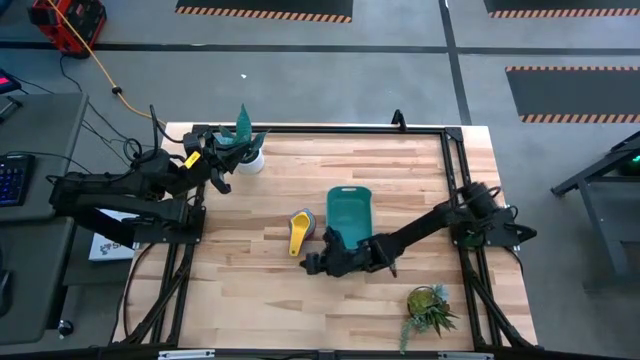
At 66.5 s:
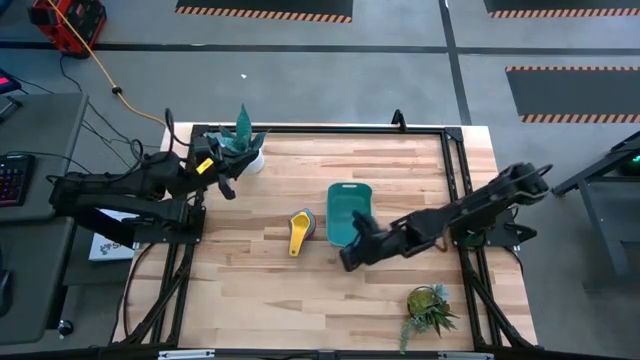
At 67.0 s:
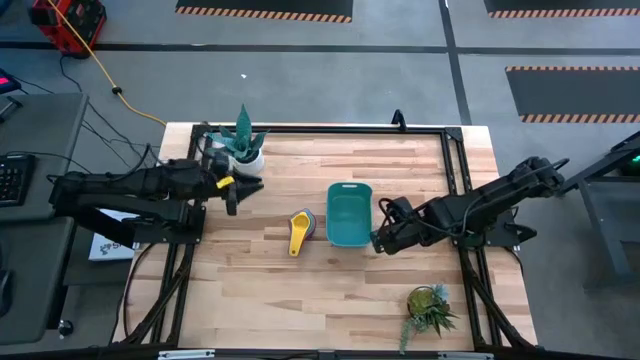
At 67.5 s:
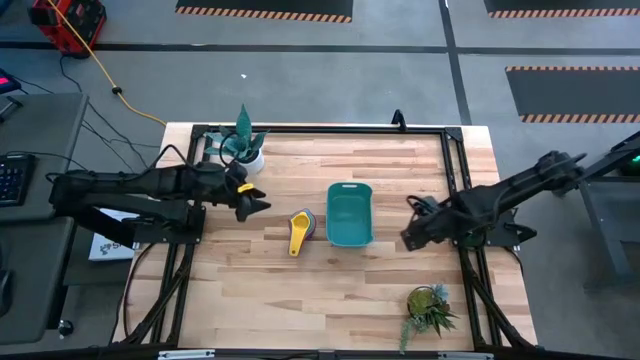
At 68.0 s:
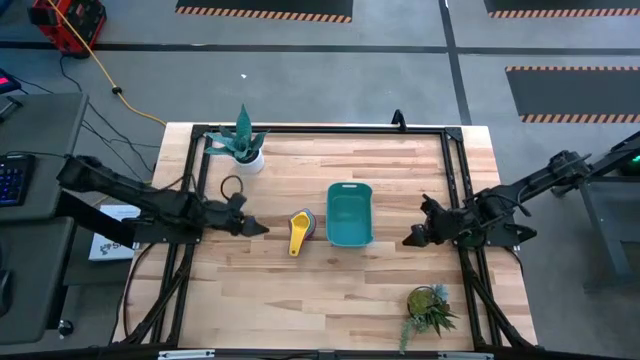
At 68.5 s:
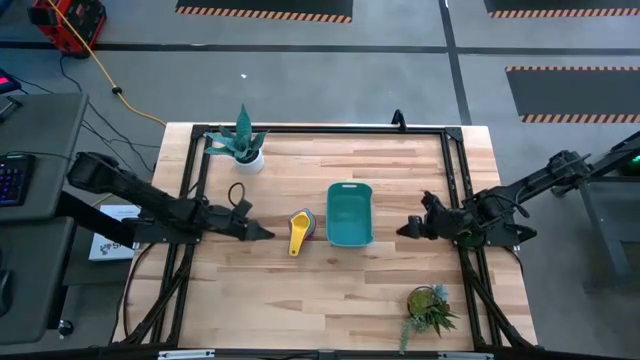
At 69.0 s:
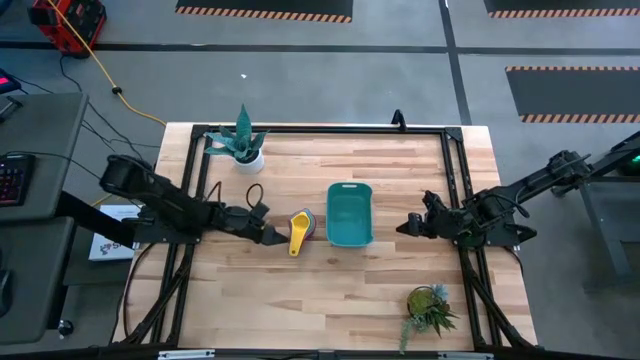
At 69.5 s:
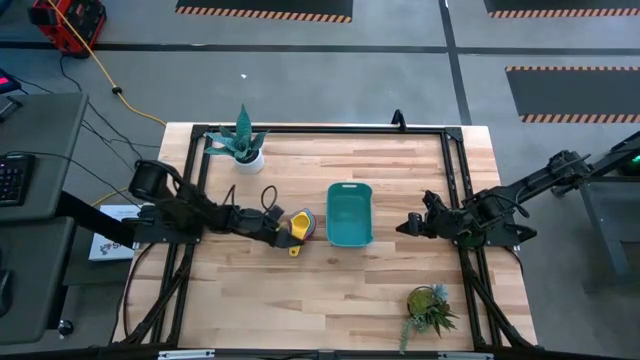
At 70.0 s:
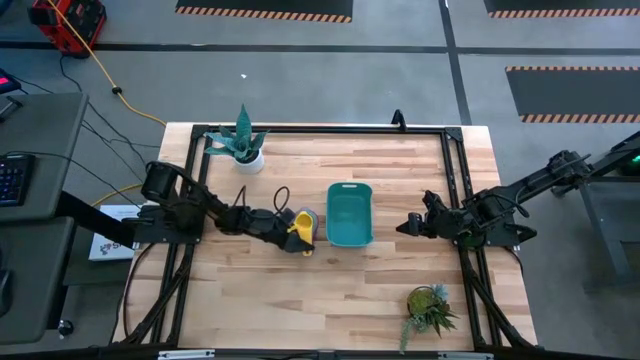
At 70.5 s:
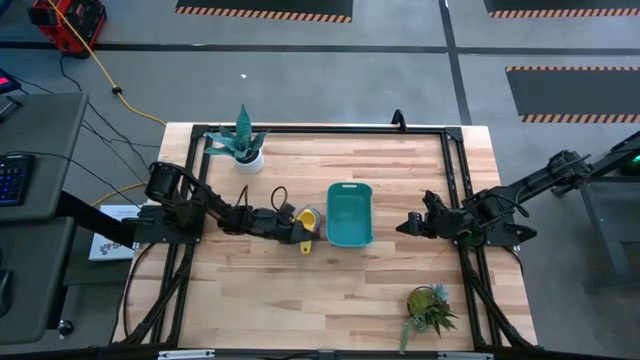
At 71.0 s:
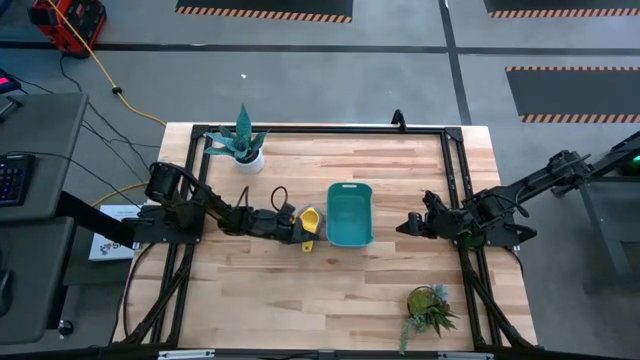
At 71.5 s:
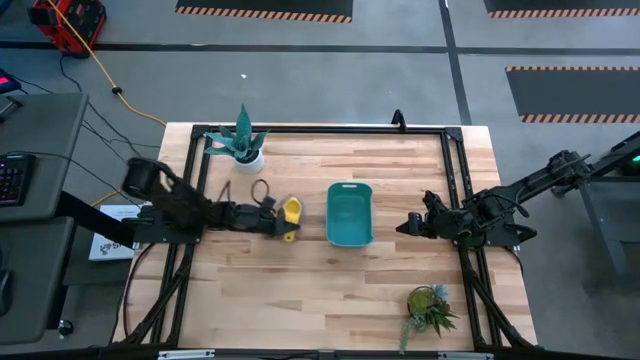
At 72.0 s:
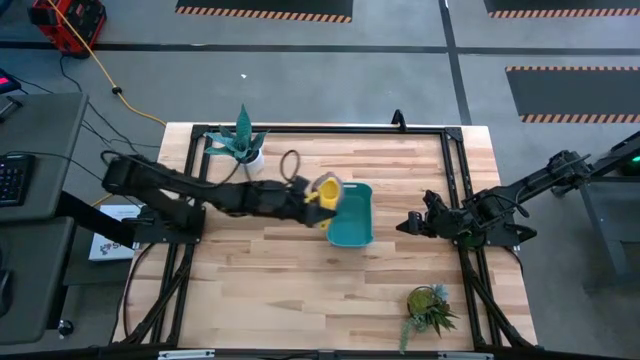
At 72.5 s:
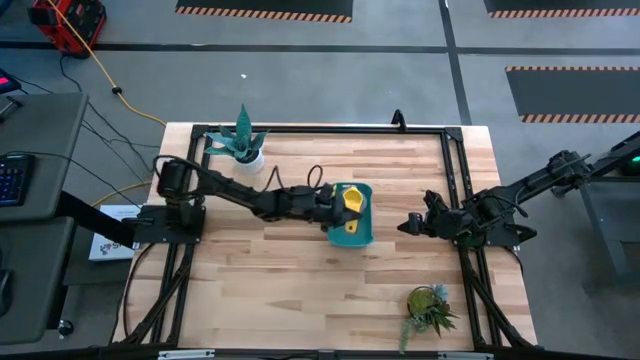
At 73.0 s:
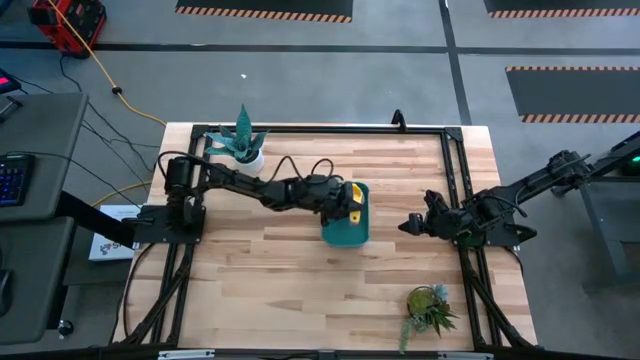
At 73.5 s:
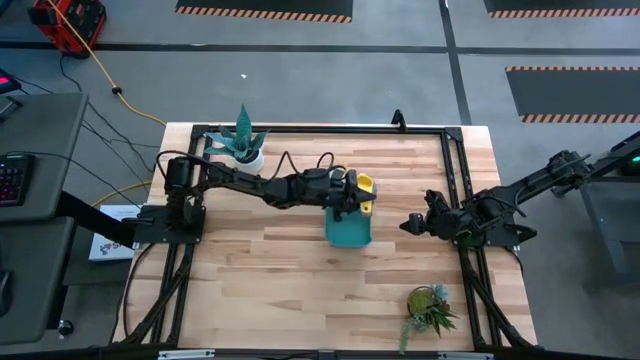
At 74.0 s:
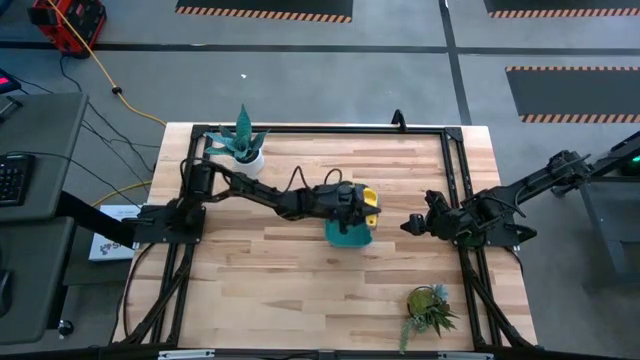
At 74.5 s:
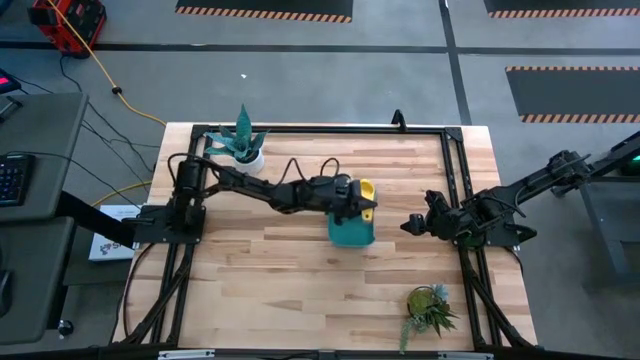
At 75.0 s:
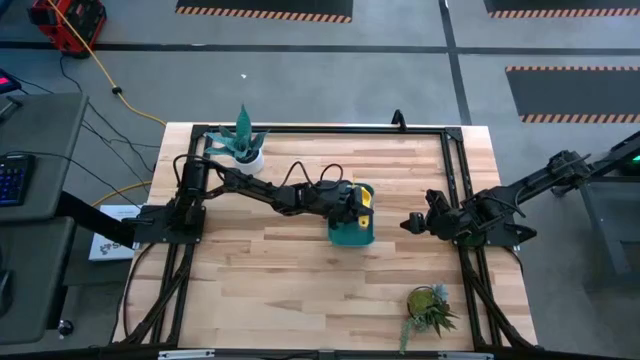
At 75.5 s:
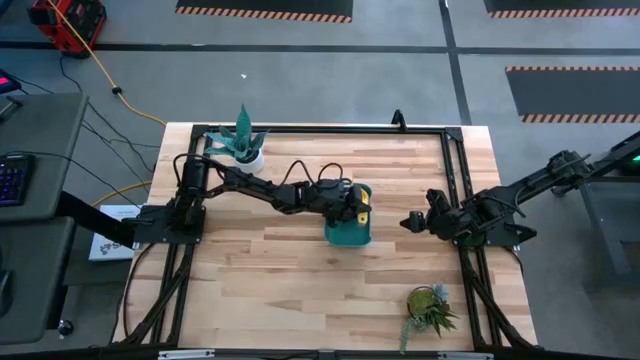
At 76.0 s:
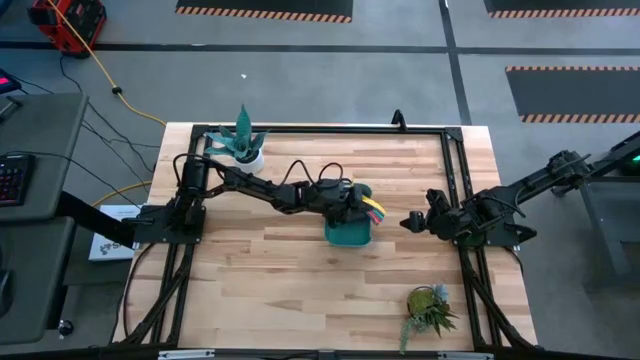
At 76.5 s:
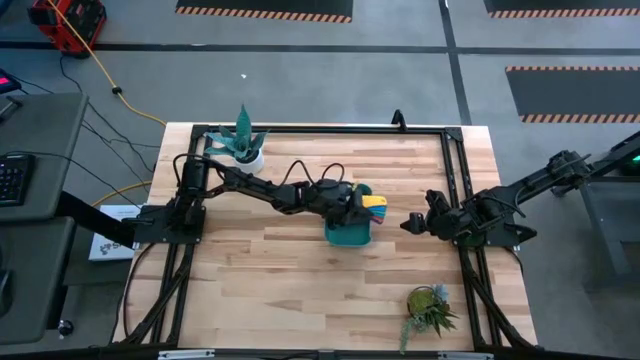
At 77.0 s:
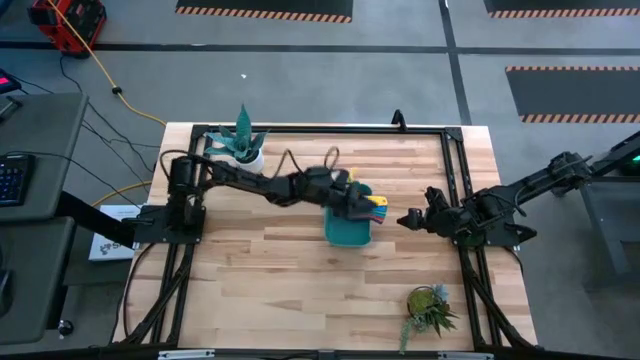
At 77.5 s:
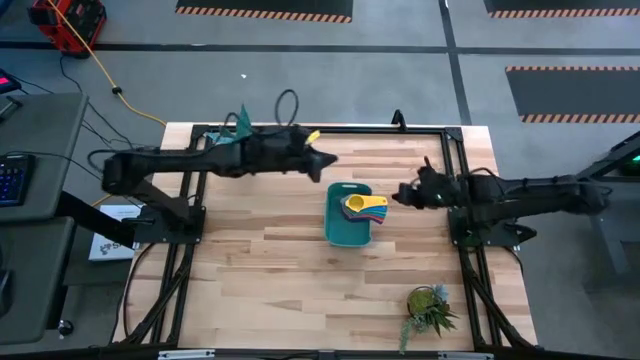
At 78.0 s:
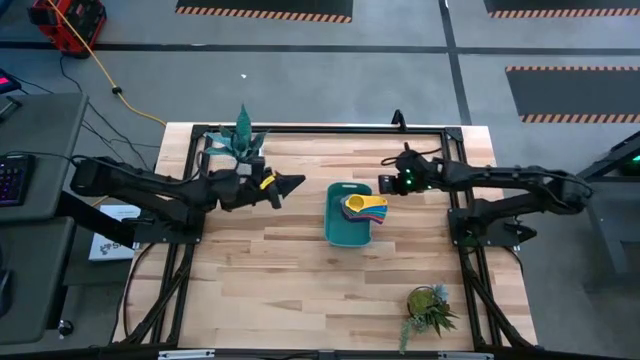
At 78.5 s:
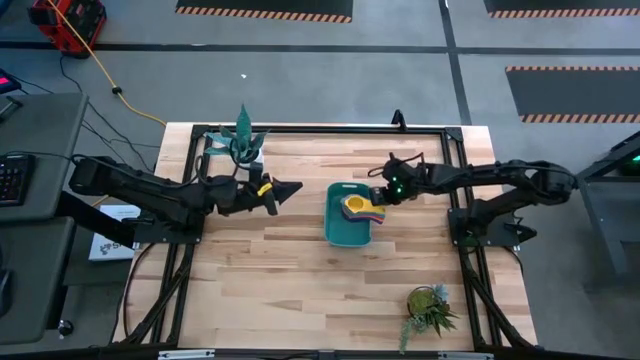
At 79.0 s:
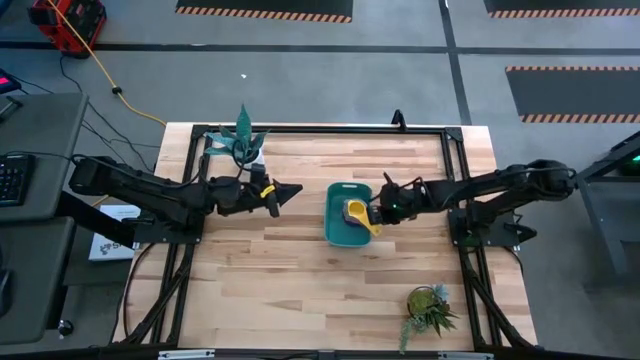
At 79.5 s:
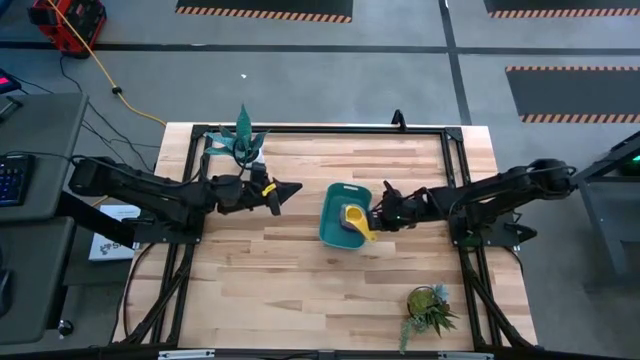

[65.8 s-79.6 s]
Task: Nest measuring cups in basket
Put the colored stacked measuring cups into the green bin

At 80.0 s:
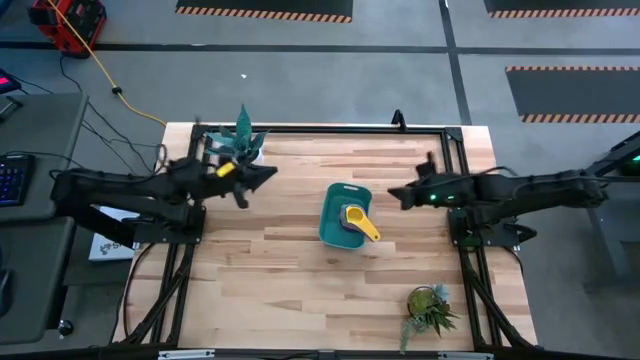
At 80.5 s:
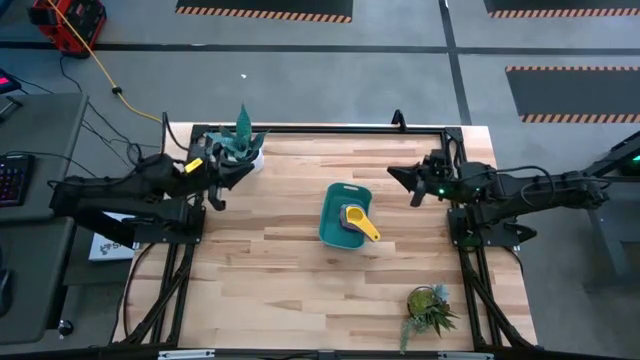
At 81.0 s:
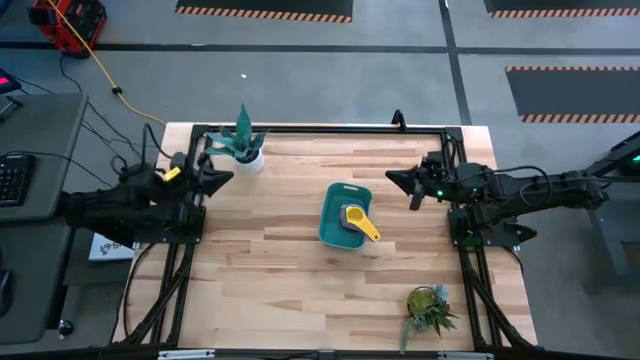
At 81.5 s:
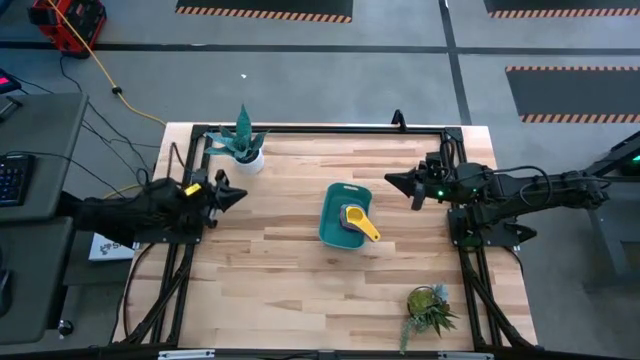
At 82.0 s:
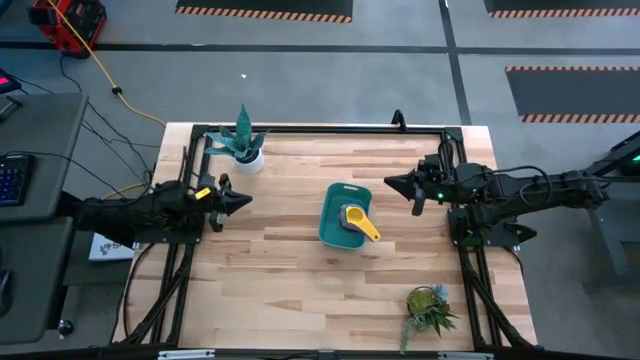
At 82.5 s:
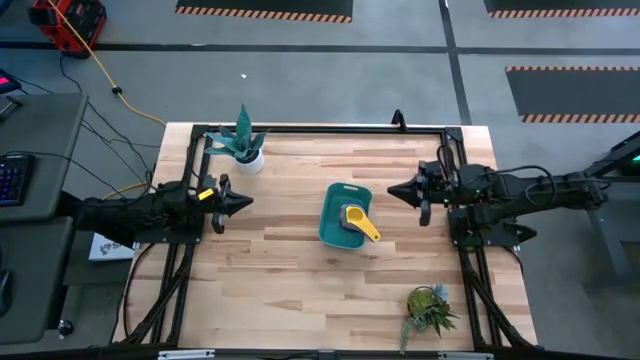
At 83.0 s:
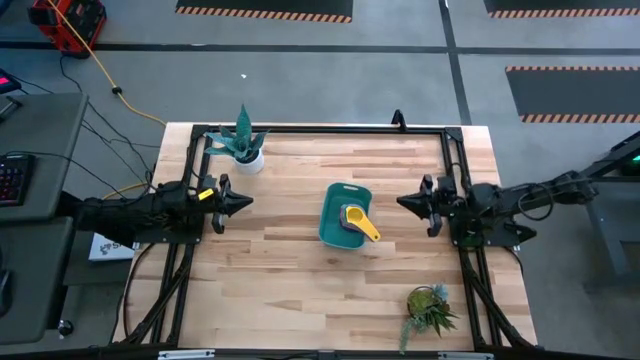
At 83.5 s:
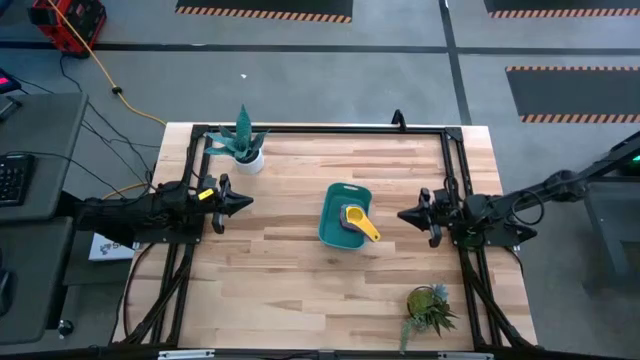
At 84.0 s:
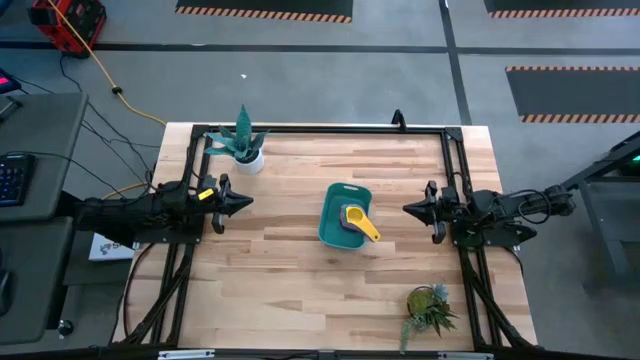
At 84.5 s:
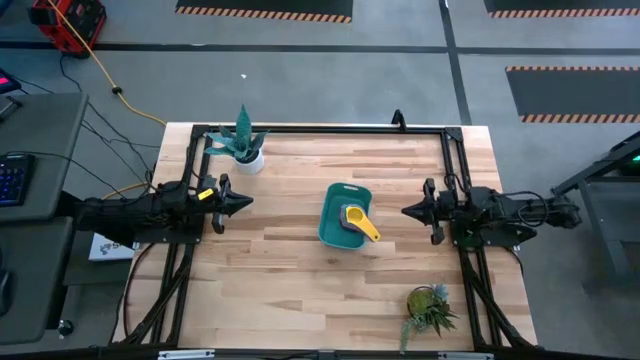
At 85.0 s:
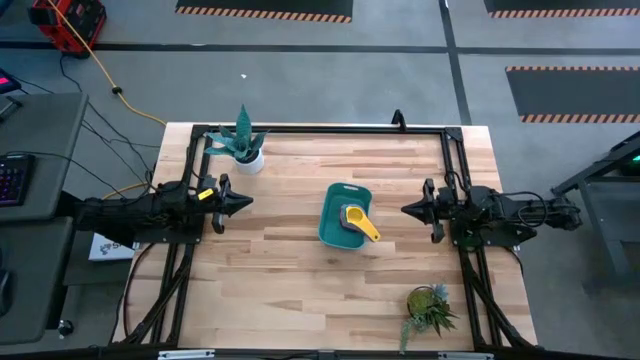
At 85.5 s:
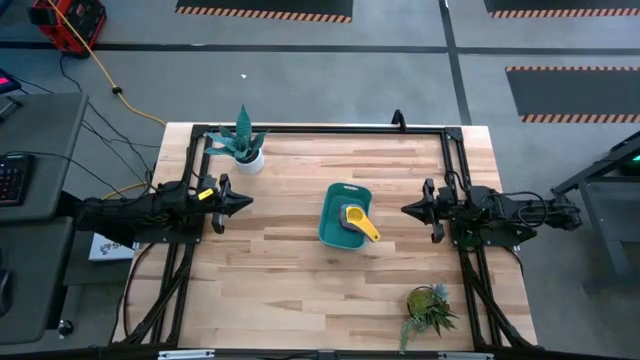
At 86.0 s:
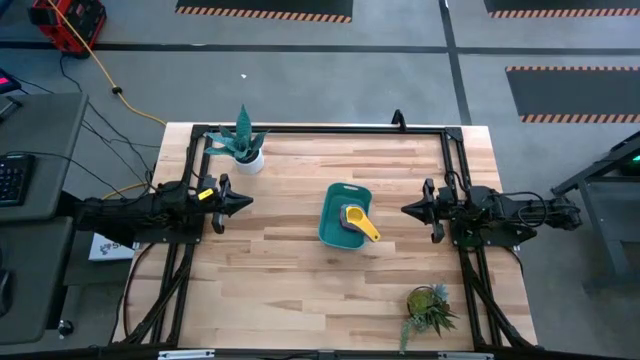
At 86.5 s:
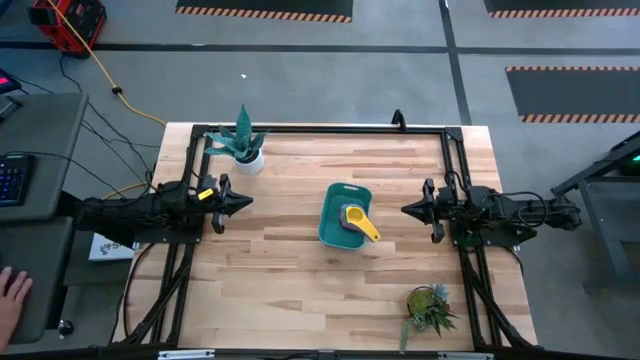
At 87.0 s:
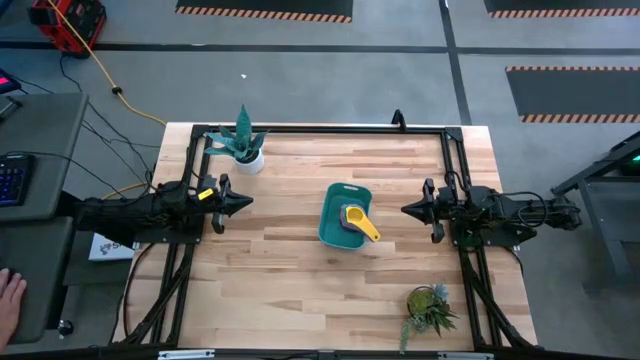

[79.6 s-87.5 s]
Return to Home Position
